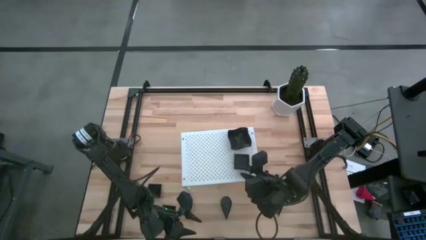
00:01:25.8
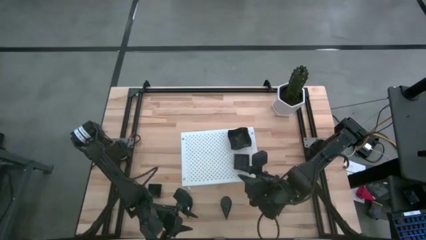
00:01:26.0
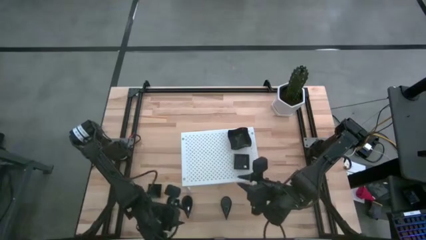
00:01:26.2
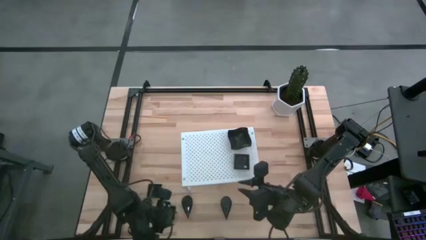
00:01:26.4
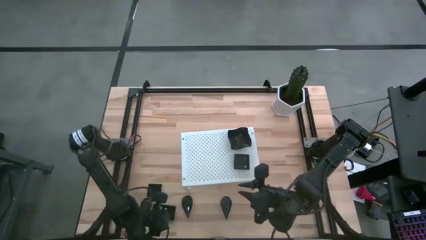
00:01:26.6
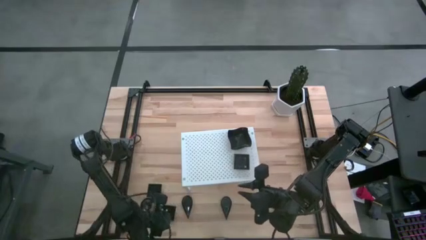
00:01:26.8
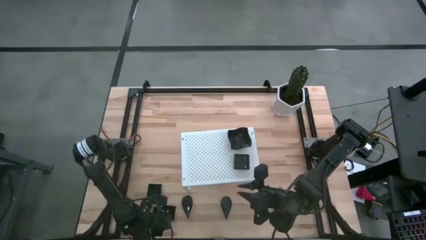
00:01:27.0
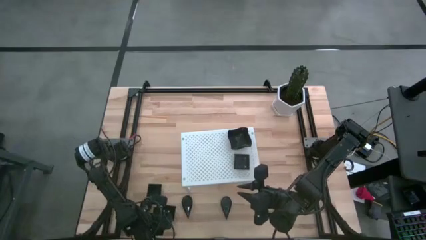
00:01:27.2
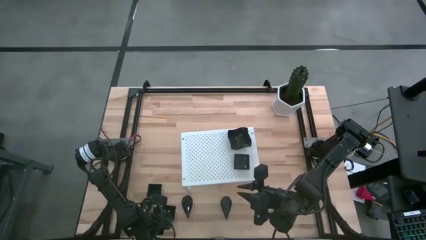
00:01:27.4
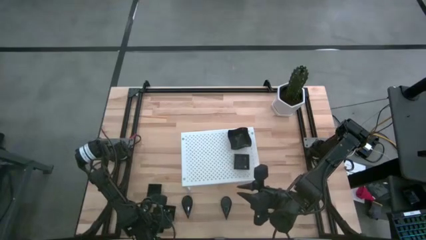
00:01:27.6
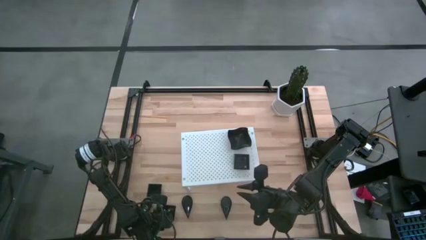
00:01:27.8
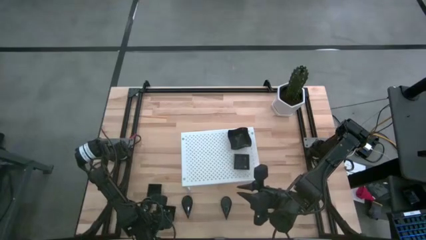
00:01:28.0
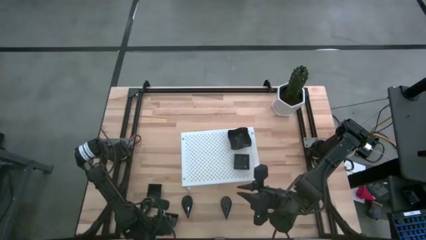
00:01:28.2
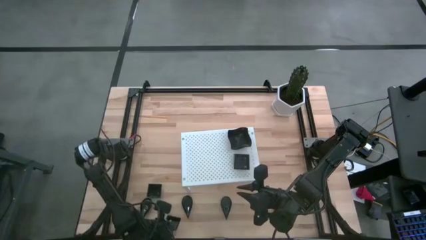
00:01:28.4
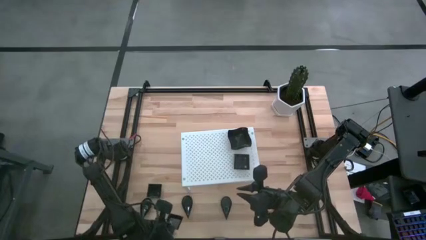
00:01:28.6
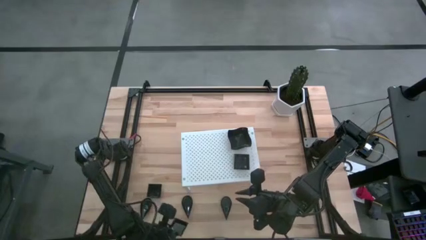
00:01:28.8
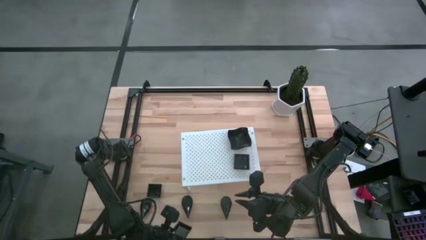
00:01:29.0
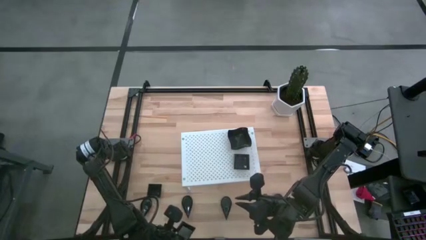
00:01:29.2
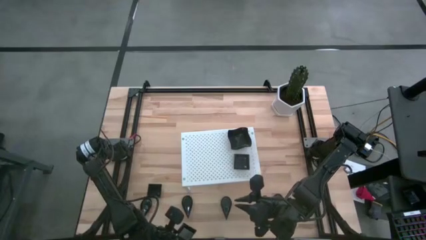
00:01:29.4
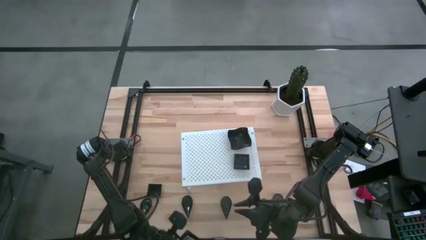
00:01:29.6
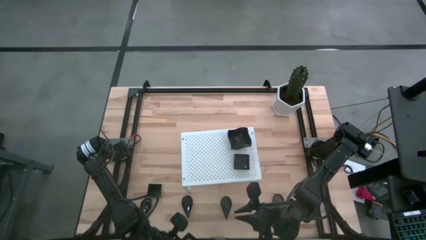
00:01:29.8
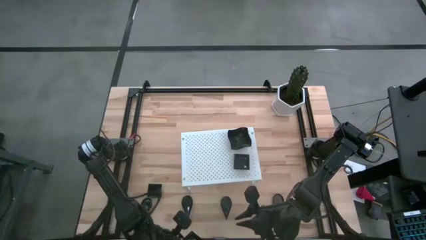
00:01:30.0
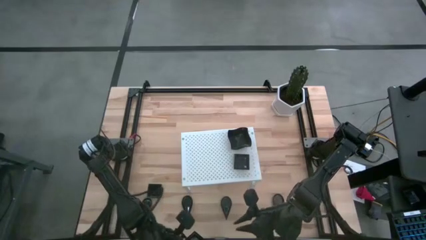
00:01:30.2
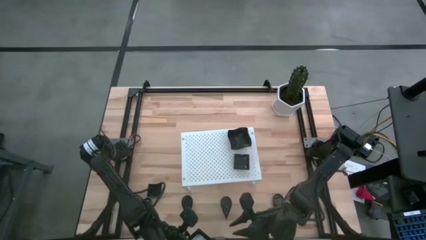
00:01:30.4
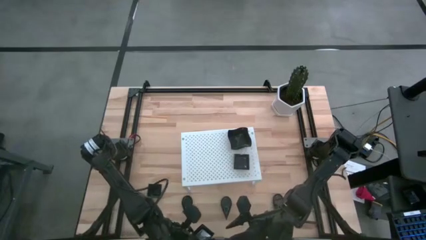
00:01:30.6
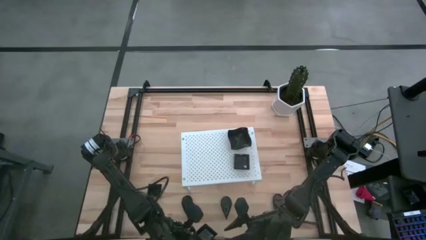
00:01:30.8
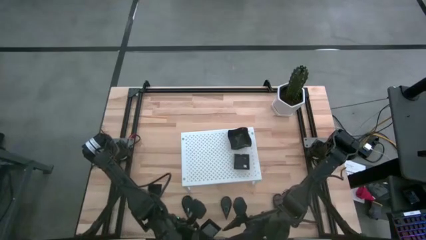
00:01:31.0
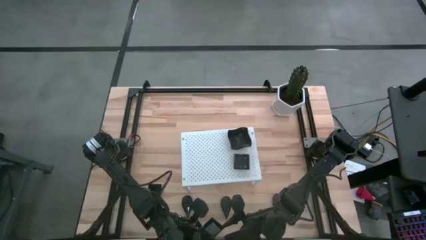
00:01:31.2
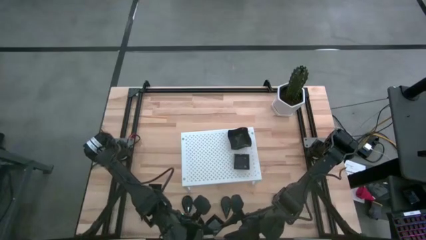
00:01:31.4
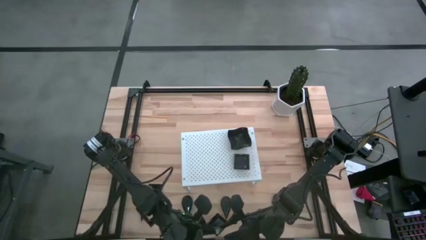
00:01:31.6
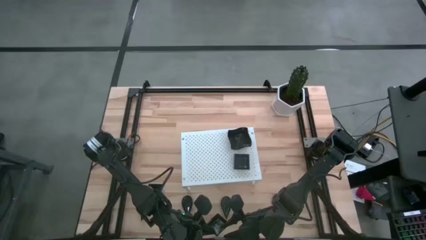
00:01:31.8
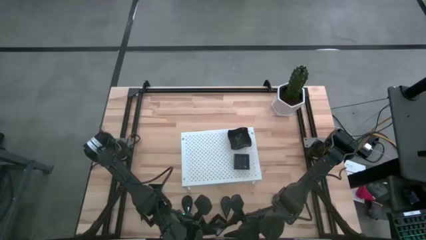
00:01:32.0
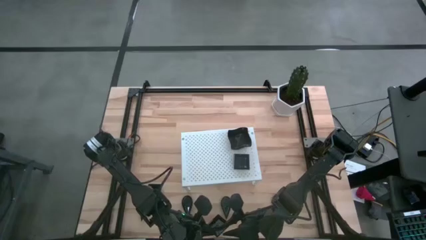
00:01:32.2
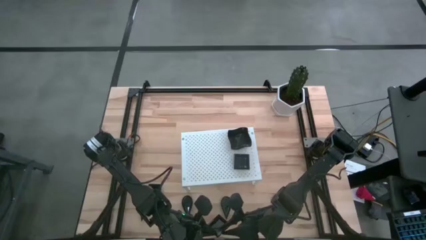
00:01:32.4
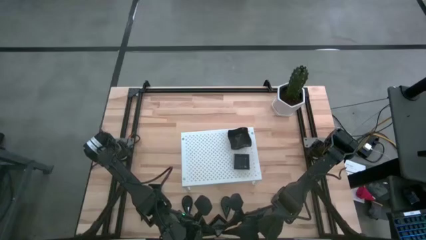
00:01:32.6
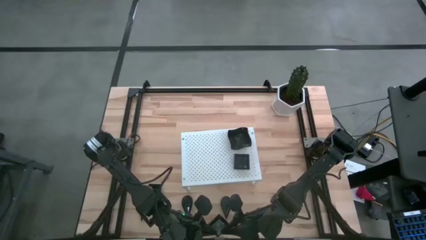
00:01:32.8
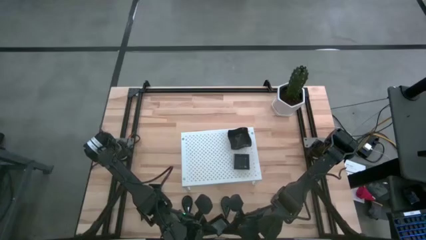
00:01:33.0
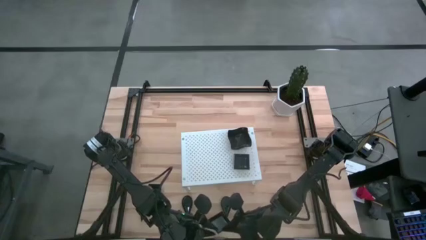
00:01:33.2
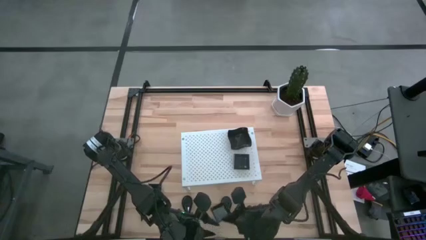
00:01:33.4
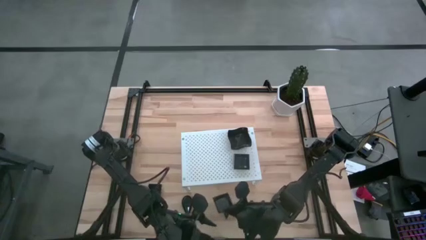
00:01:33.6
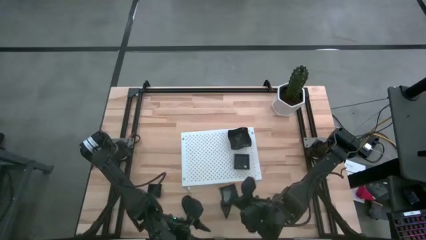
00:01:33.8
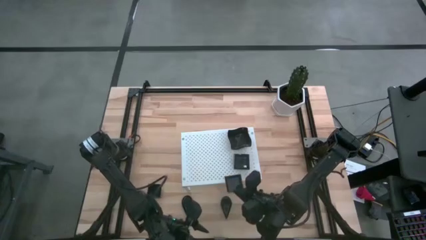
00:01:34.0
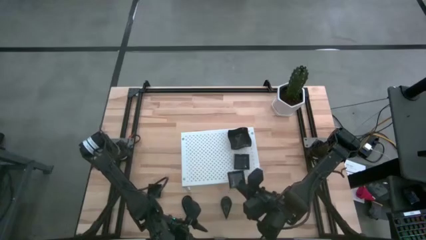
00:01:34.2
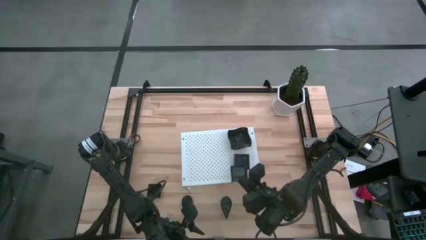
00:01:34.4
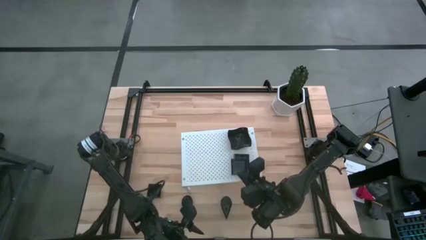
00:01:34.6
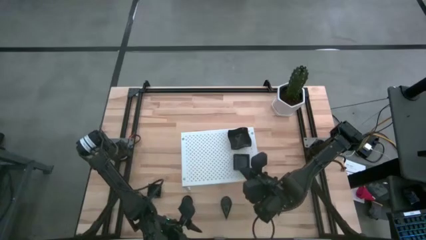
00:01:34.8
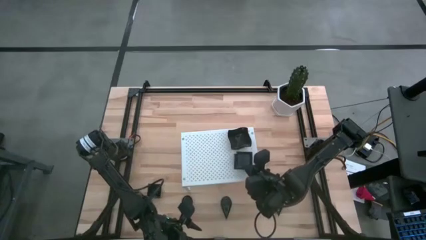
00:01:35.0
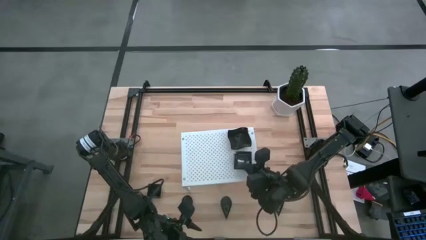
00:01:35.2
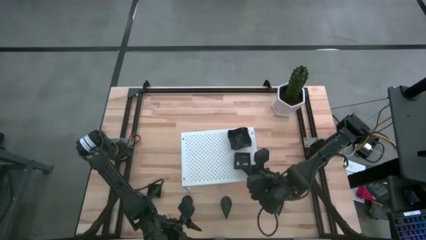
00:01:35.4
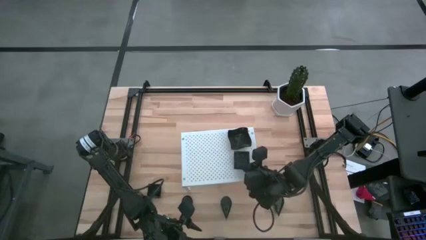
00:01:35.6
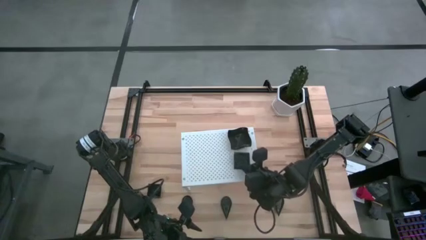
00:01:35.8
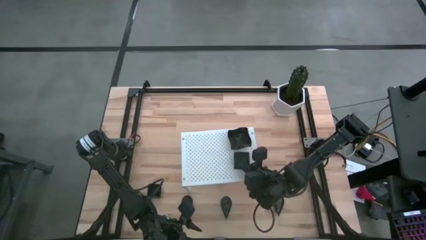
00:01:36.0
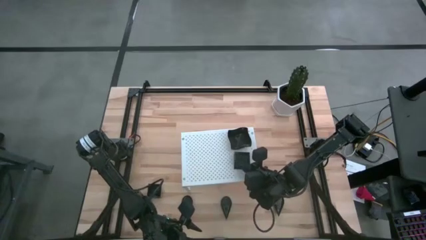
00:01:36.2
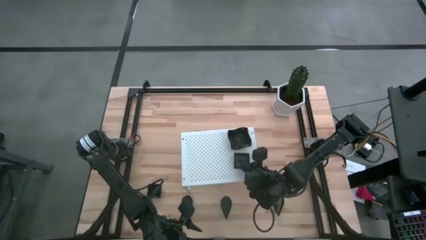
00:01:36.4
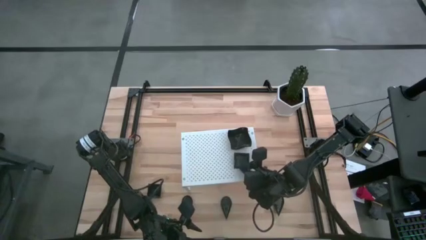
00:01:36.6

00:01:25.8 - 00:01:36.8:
Task: Pick & Place Mini shaped plates
Stack the square plate on top of the other square plate on the shelf

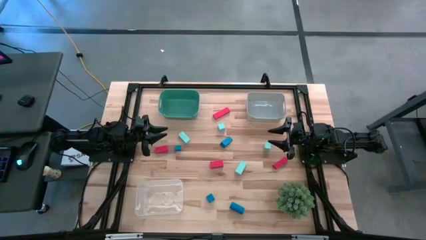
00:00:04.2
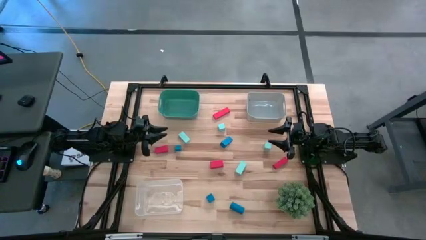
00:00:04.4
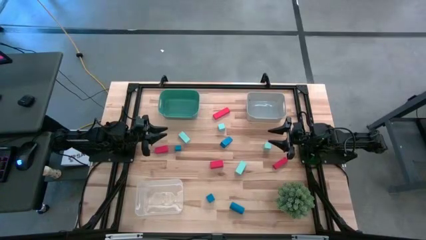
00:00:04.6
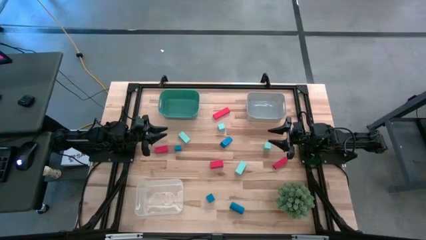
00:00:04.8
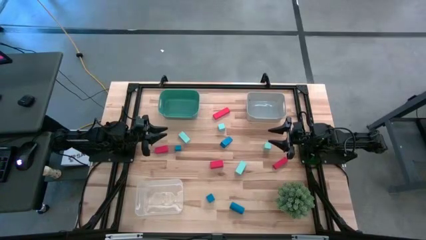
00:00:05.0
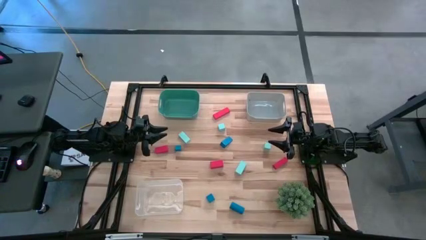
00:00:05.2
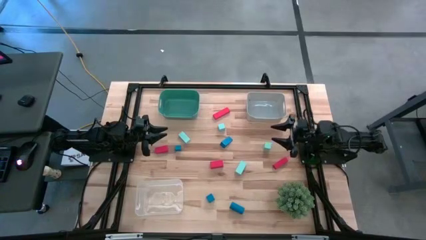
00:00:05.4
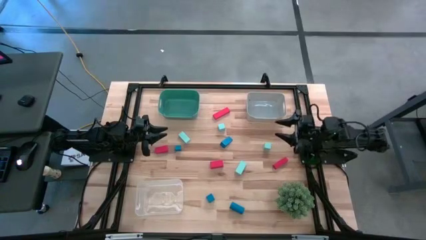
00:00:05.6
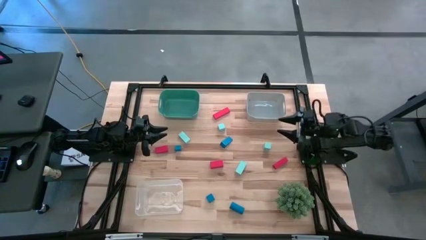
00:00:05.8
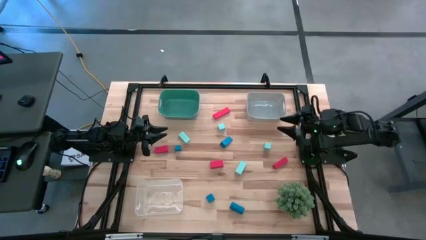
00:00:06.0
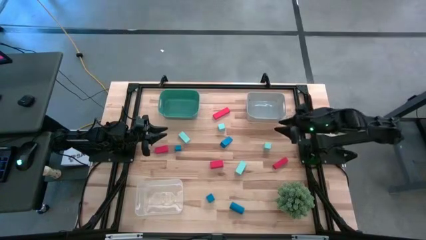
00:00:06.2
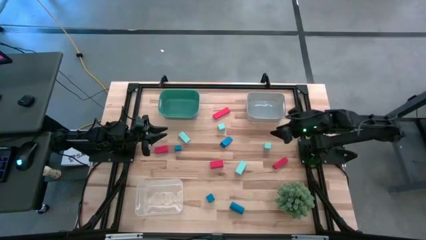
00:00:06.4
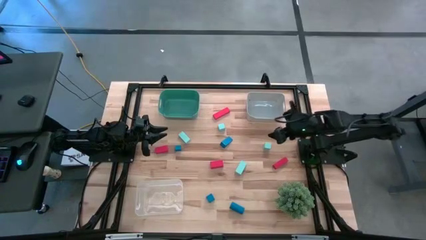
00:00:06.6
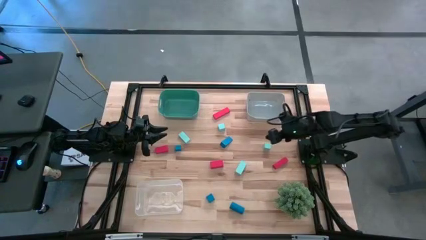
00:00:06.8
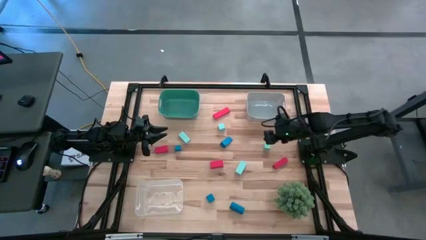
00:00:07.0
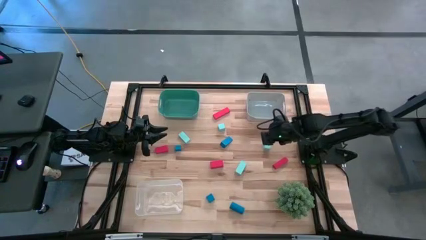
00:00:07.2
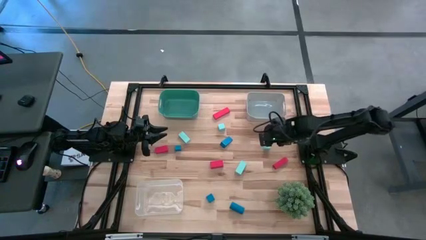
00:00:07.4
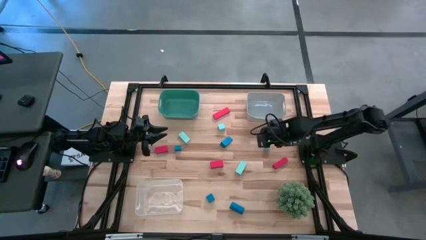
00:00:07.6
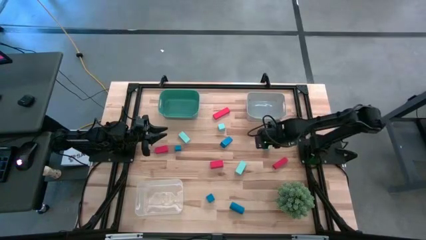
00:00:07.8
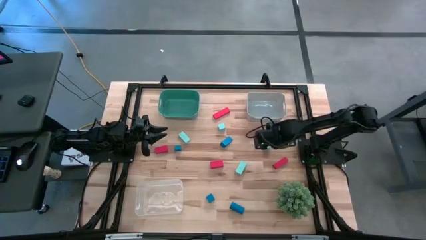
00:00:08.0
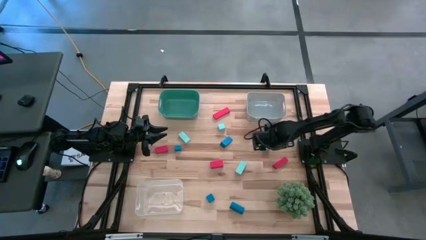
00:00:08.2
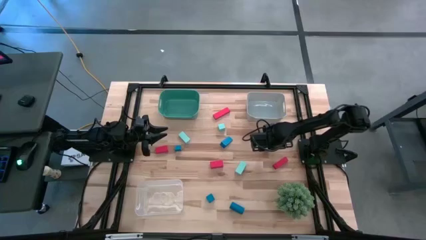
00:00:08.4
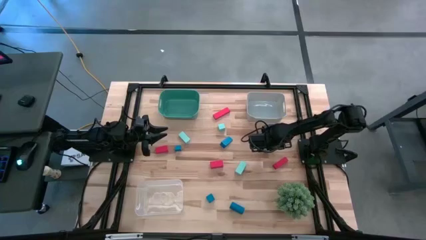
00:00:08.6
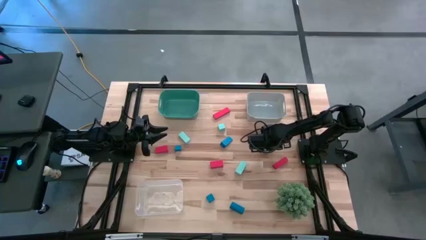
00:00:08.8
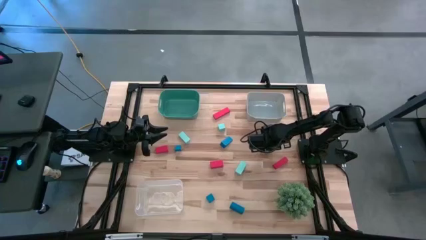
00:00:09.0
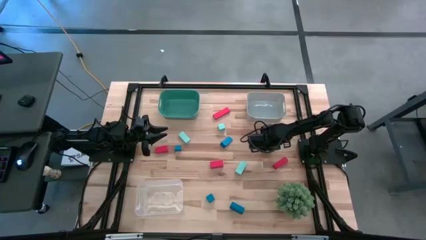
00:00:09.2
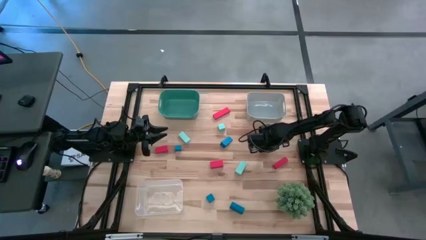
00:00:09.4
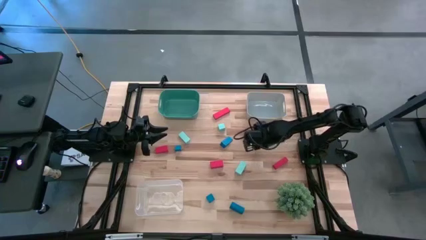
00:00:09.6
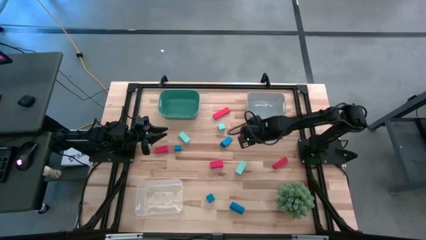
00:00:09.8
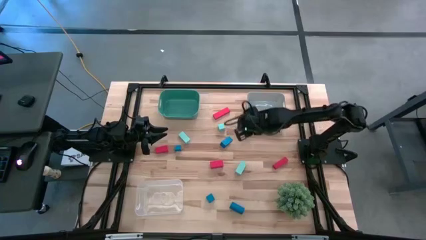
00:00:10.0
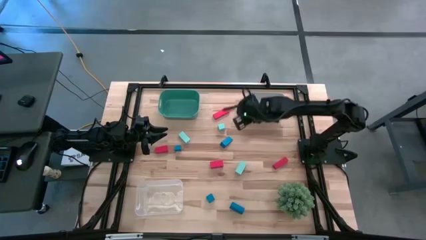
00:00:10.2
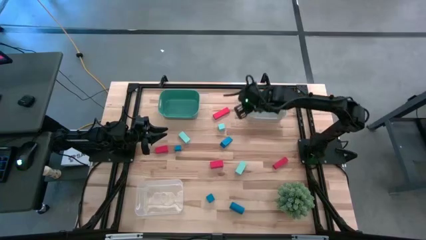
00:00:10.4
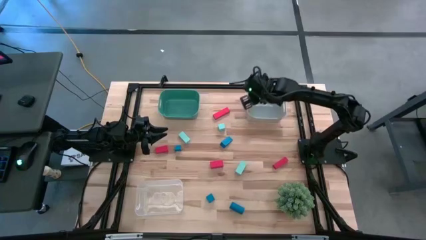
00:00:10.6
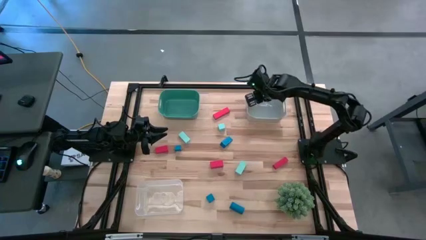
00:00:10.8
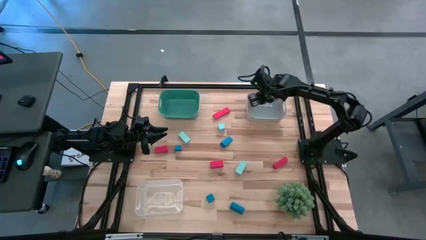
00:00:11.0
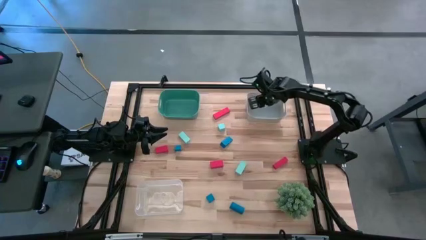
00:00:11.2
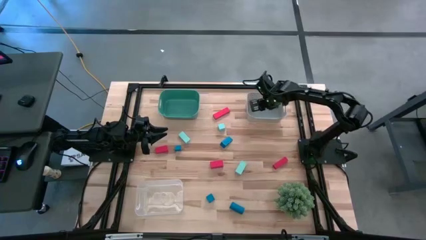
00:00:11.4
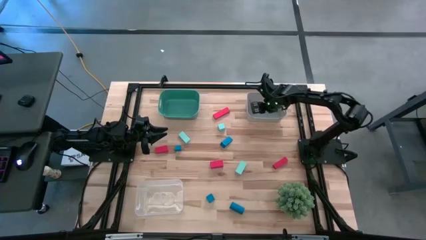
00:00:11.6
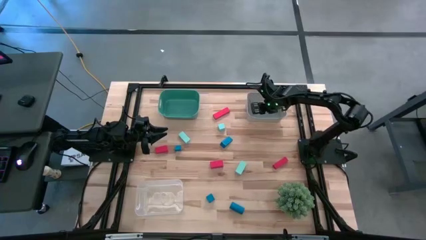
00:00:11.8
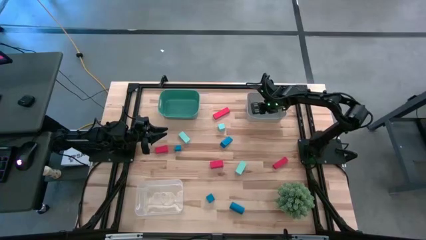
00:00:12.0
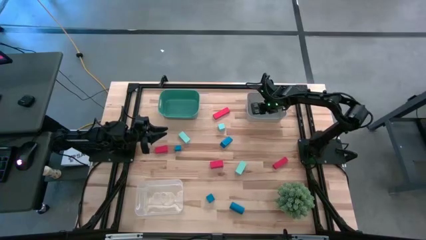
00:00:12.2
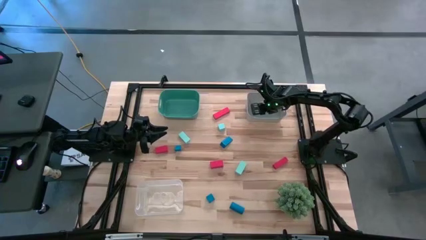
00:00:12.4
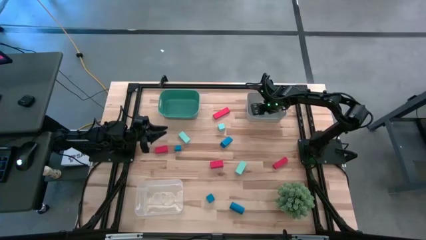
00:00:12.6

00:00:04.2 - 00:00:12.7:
Task: Sort & place blocks by color
Put the light blue block into the gray bin
